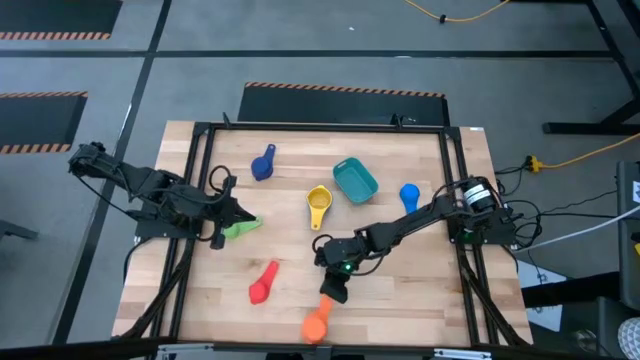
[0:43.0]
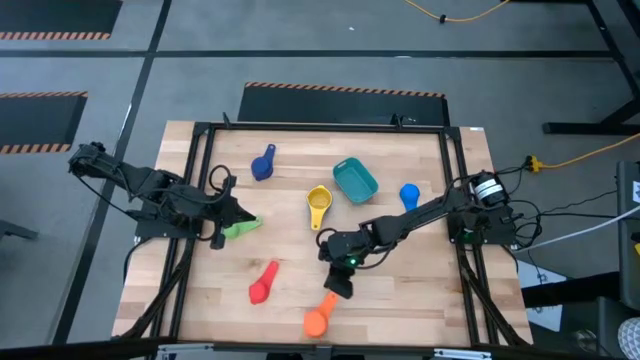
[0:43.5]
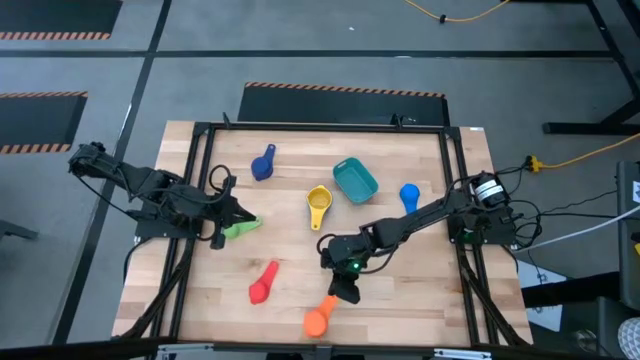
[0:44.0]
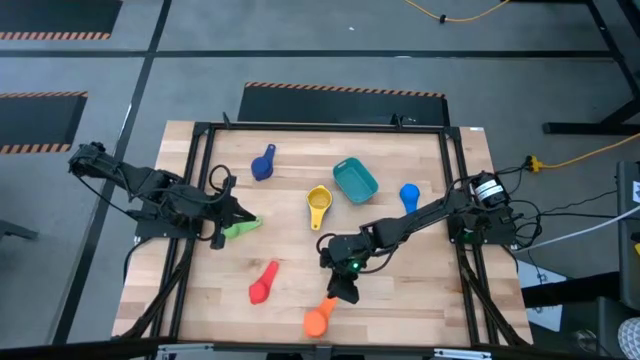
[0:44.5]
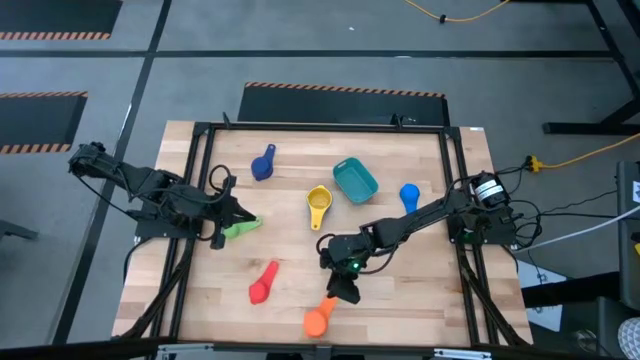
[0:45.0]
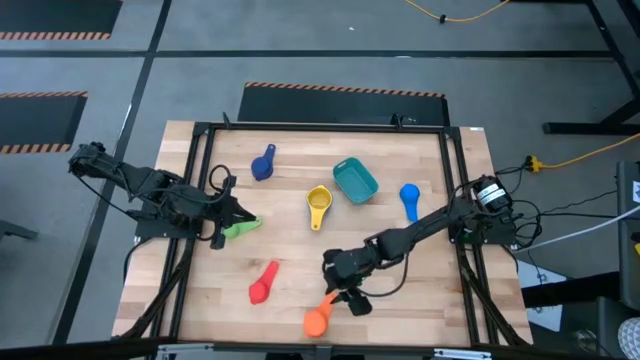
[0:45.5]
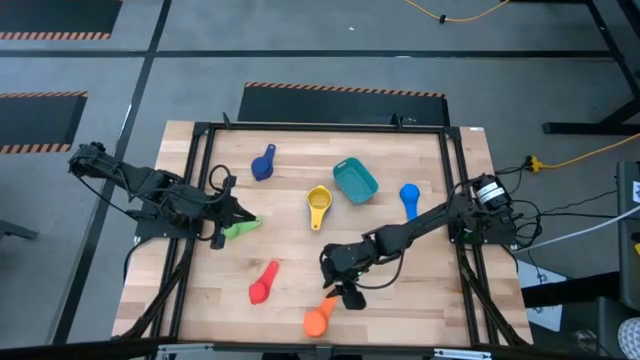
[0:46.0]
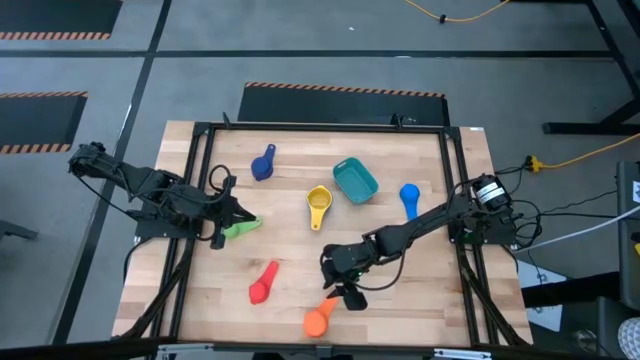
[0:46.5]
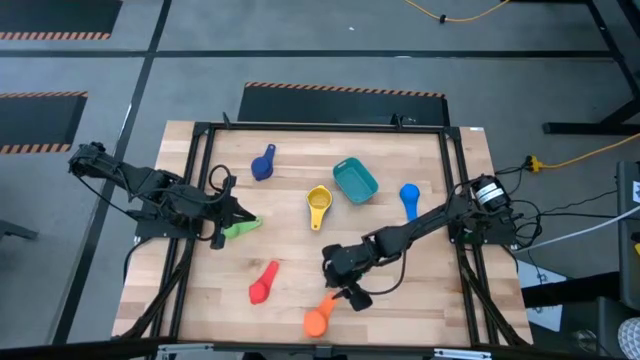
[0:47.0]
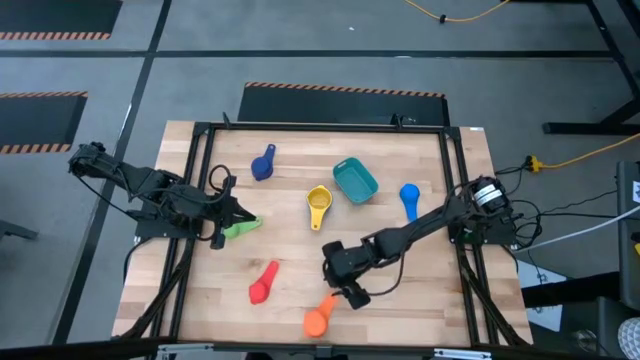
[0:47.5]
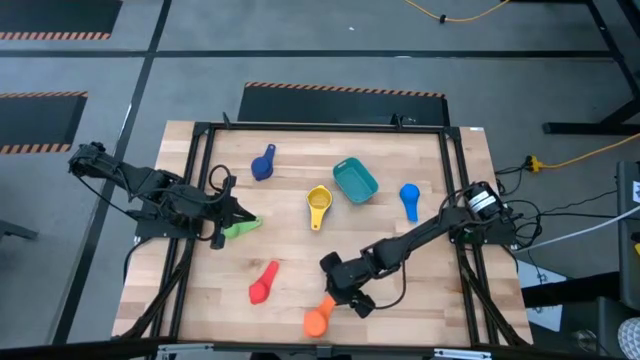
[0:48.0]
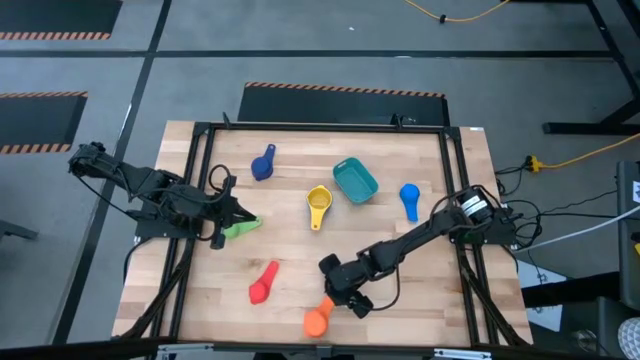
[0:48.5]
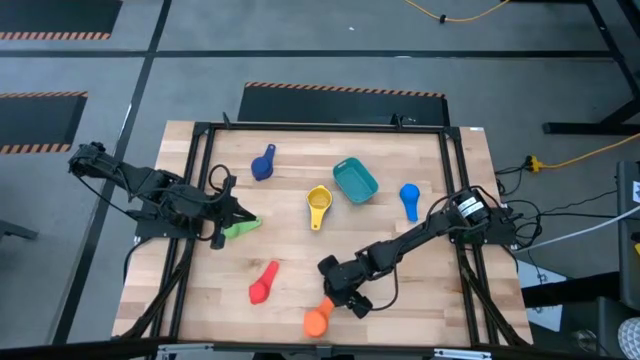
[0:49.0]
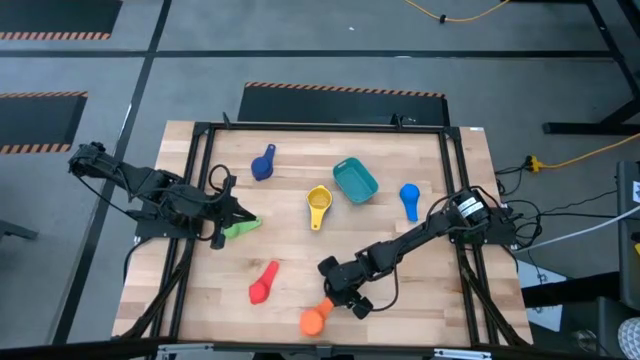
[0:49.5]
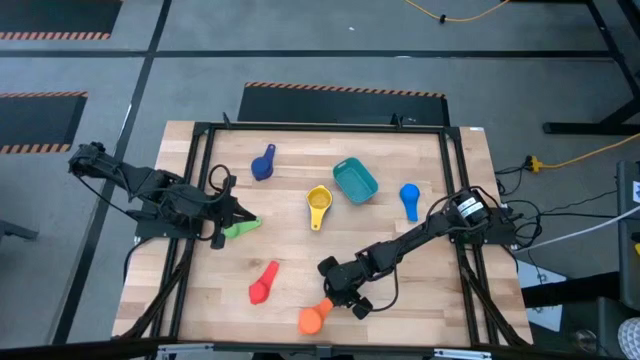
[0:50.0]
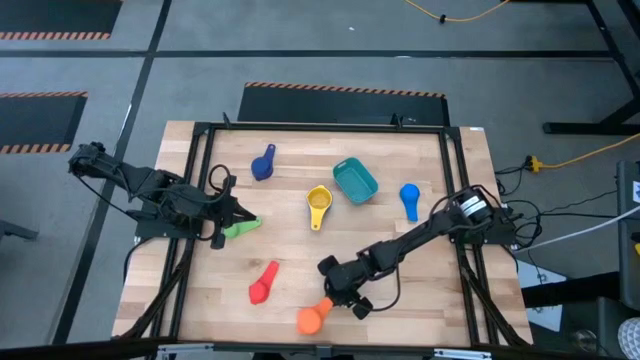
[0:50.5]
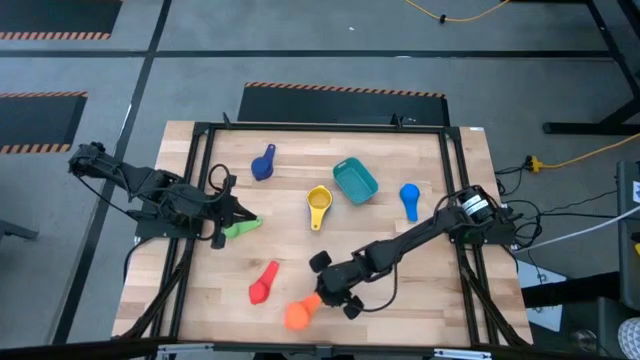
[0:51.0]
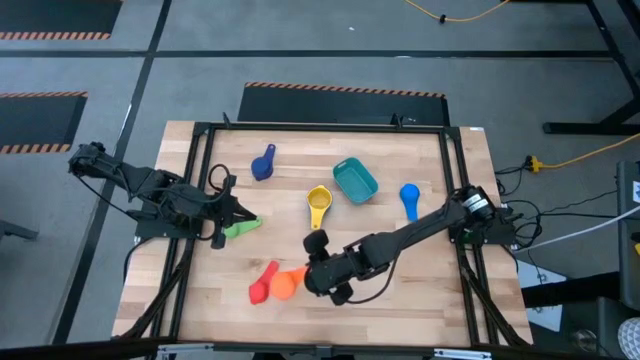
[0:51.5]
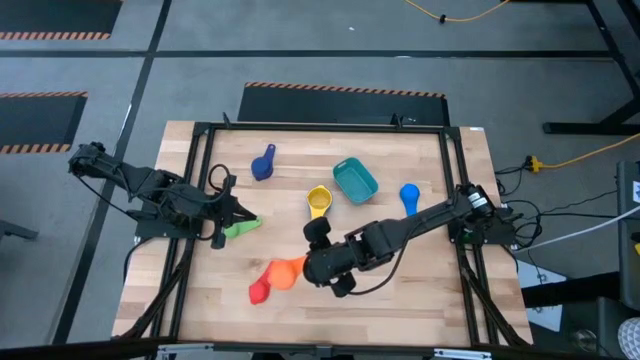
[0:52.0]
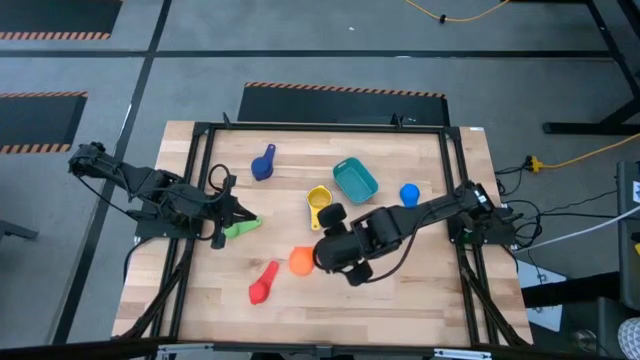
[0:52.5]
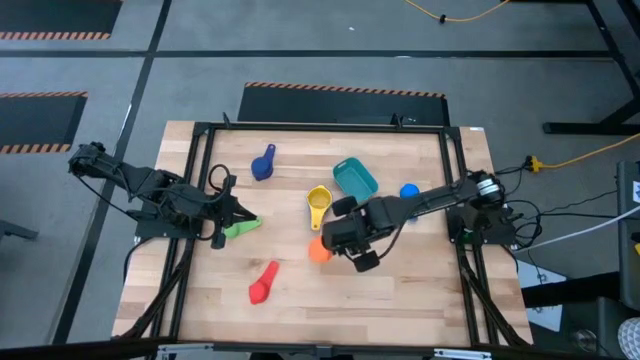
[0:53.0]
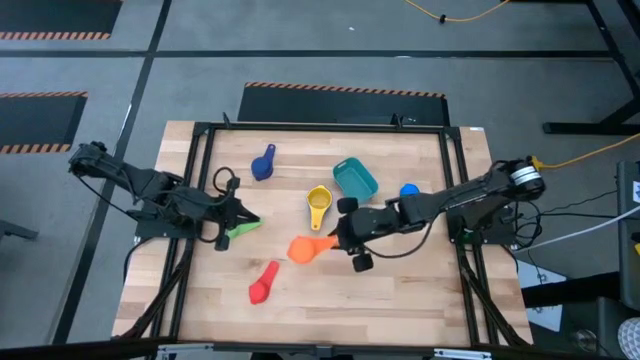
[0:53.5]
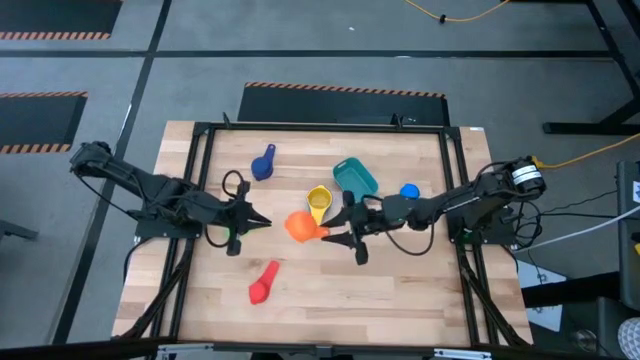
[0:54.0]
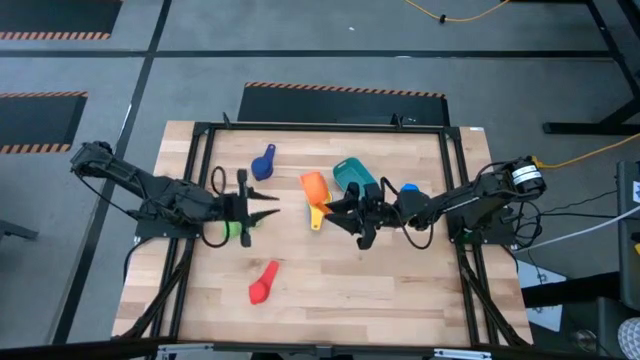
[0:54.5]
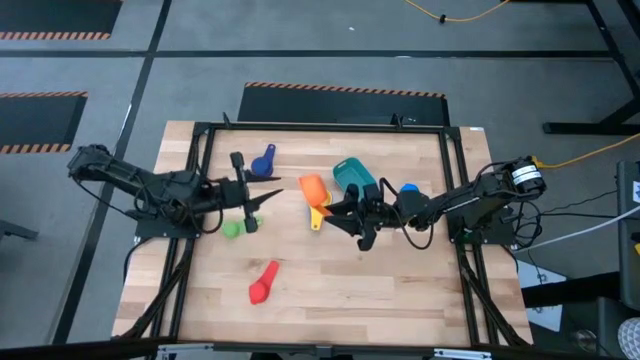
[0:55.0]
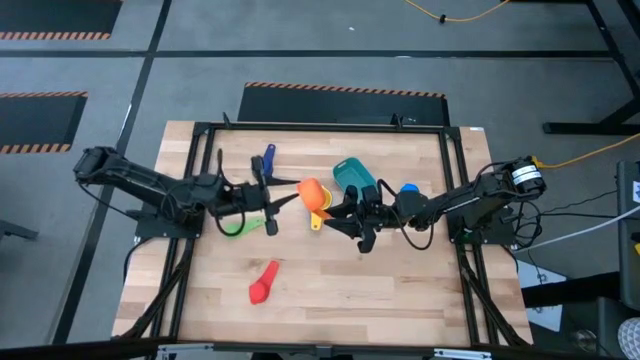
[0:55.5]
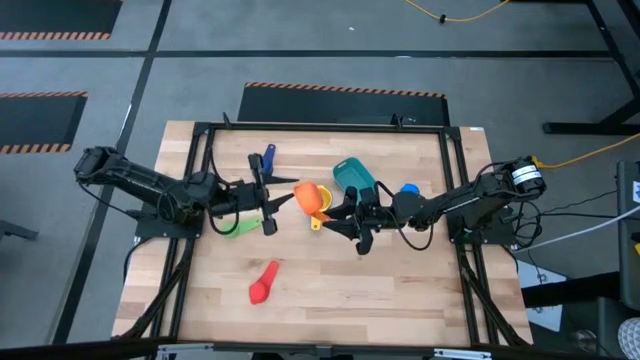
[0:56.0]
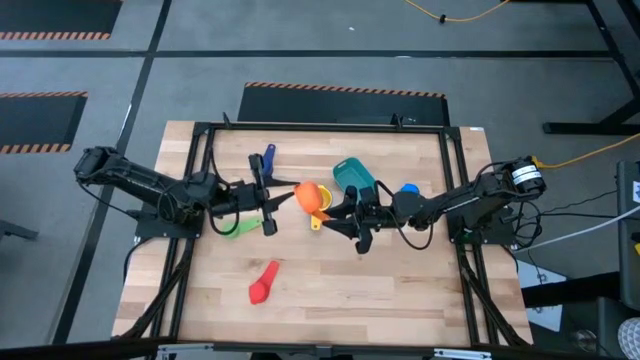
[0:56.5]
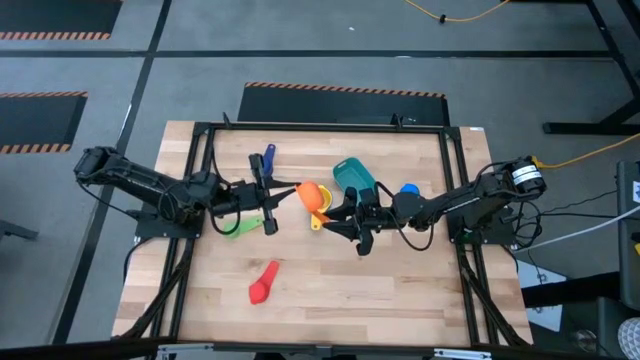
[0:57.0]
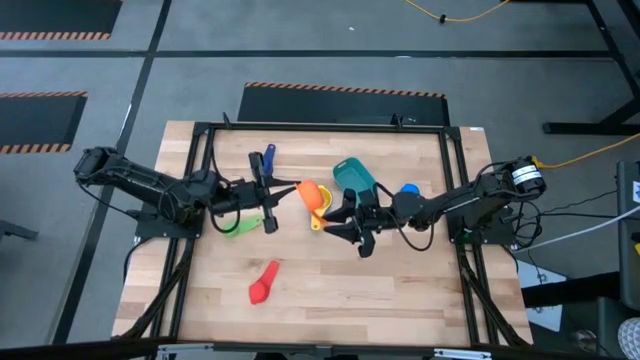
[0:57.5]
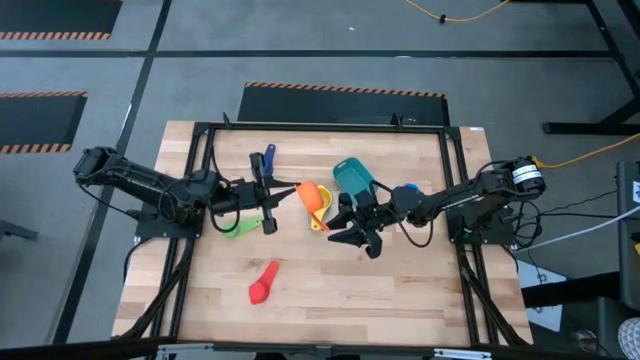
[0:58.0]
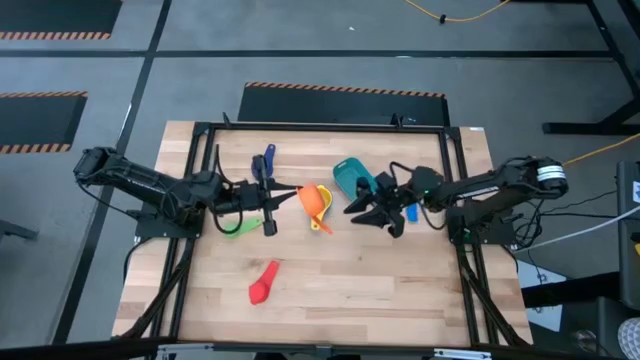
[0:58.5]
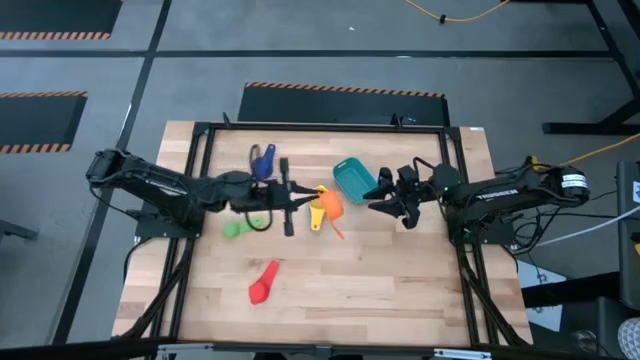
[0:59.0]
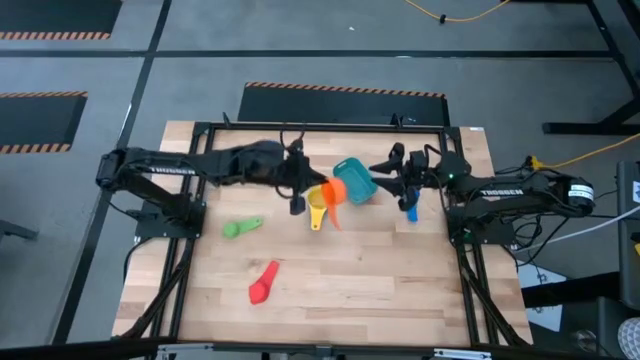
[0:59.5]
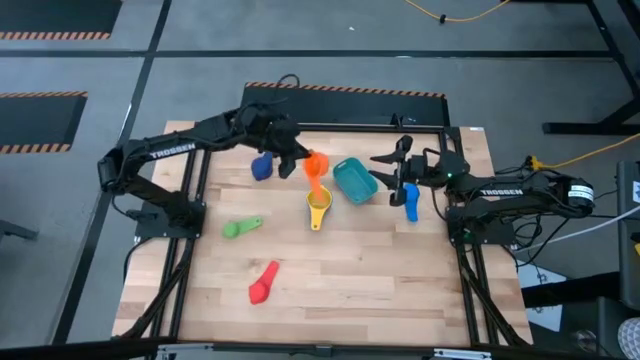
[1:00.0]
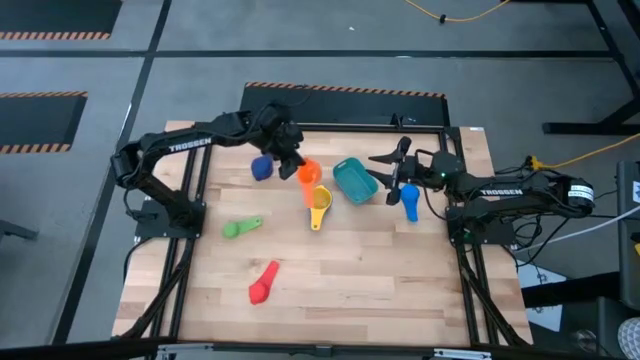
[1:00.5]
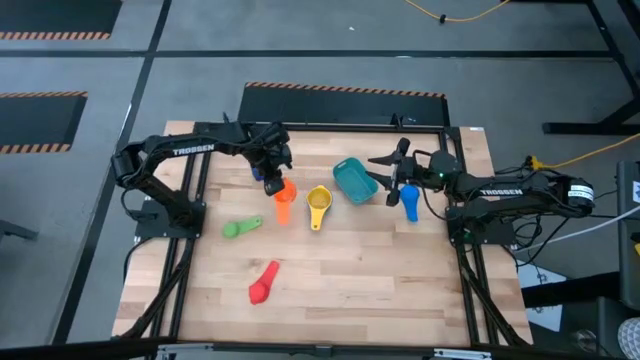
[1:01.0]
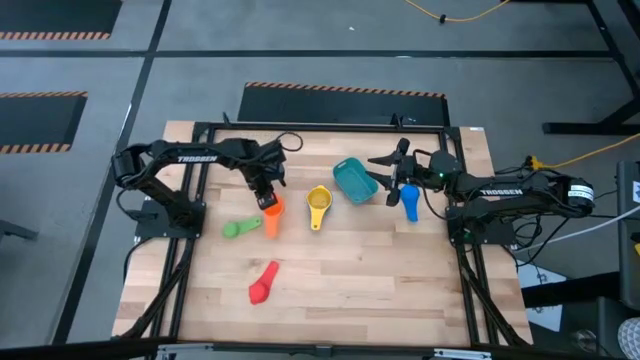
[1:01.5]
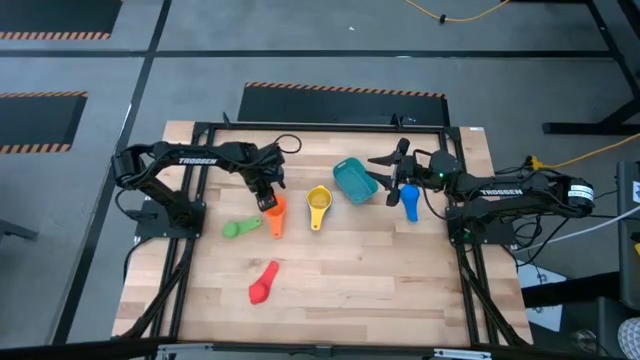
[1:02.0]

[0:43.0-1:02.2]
Task: Nest measuring cups in basket
Move the orange measuring cup to the right of the green measuring cup
